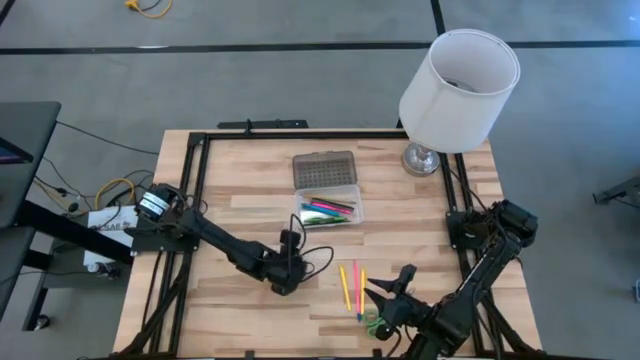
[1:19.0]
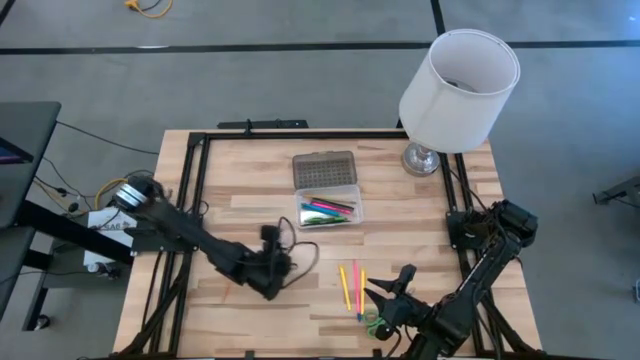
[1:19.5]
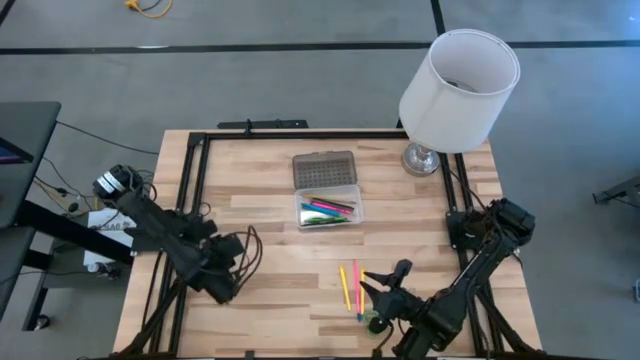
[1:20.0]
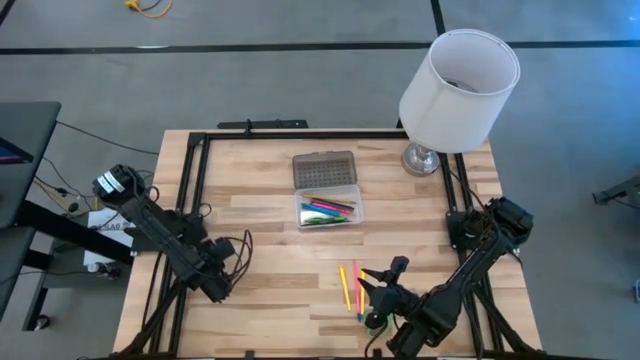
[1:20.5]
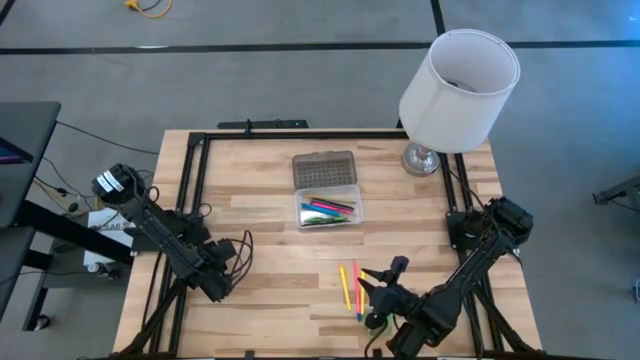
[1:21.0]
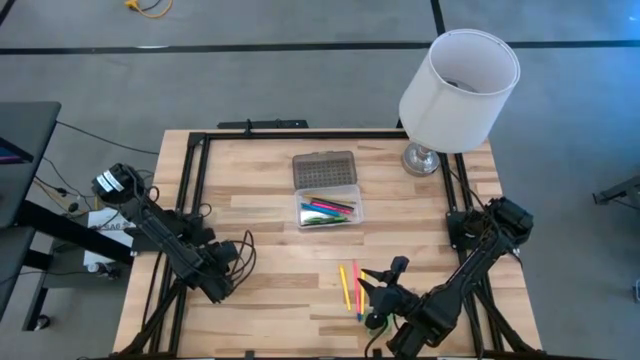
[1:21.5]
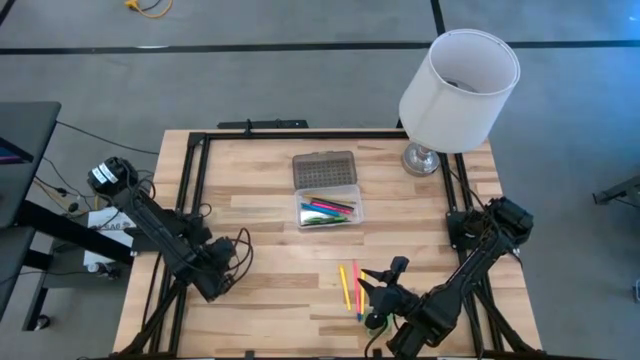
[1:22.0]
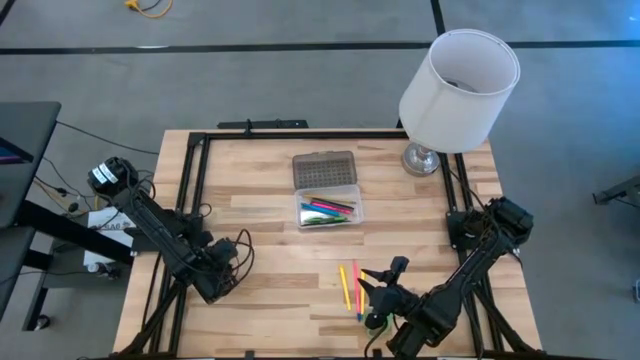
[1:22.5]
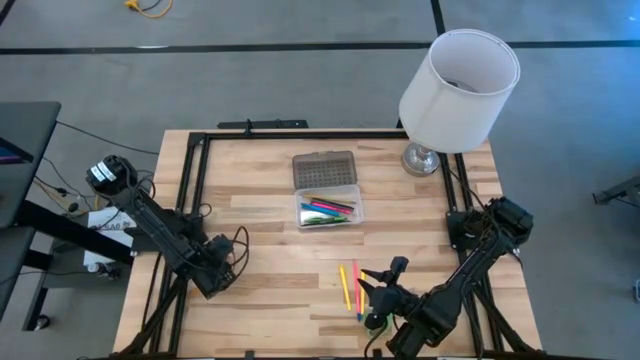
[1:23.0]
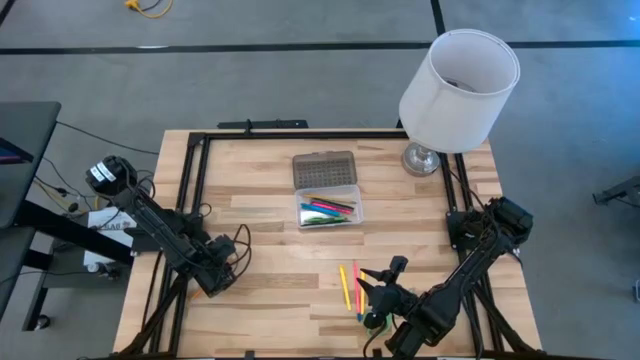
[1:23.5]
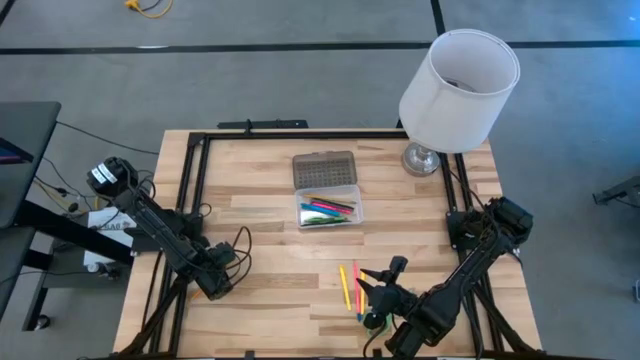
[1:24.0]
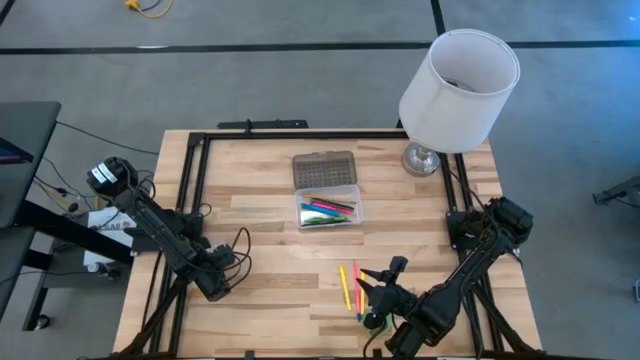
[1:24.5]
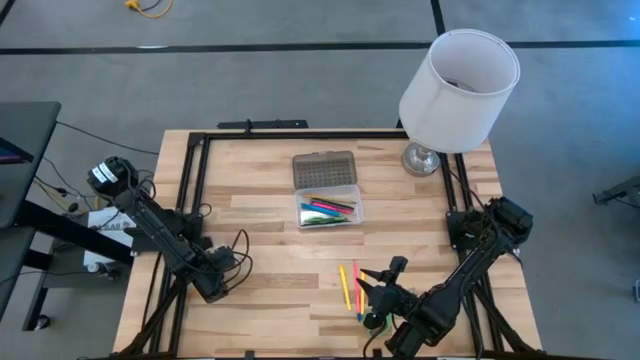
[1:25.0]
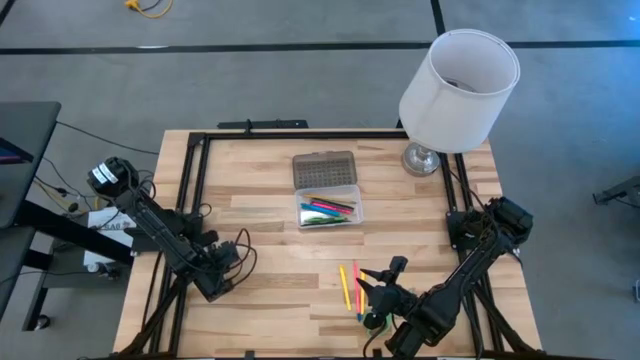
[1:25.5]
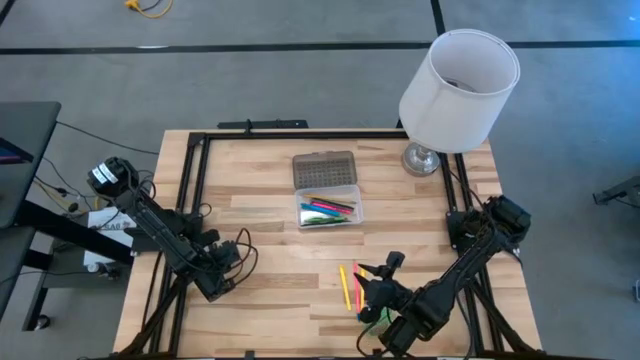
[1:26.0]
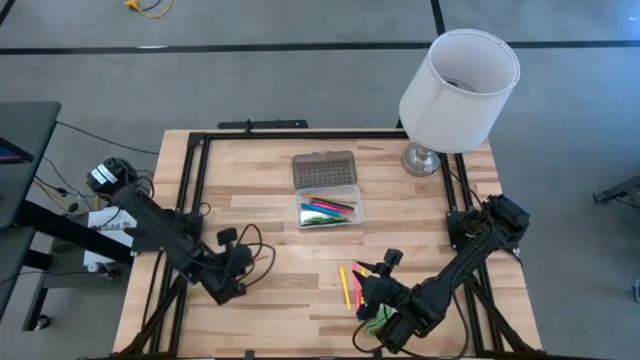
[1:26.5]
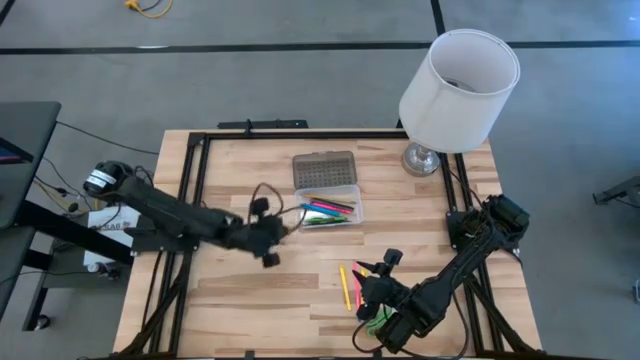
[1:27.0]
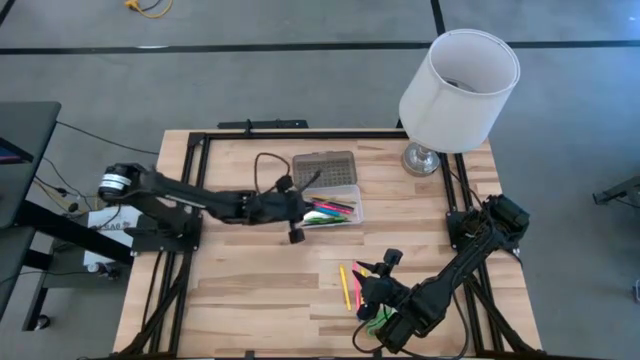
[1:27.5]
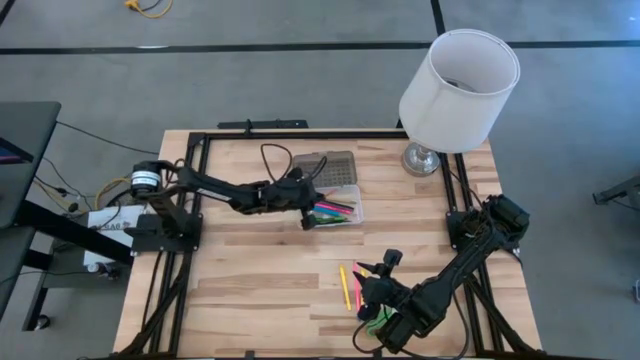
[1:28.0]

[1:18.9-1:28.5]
Task: Pick & place school supplies into a supply box
Put the pencil into the gray supply box

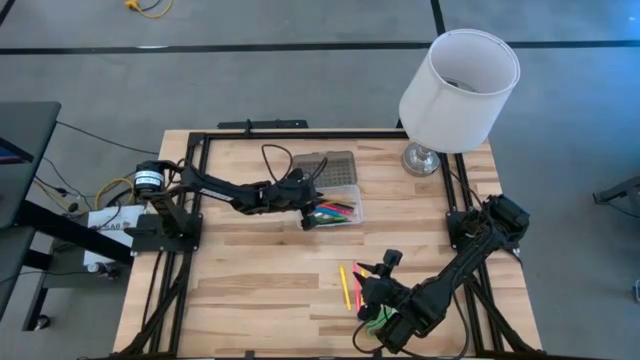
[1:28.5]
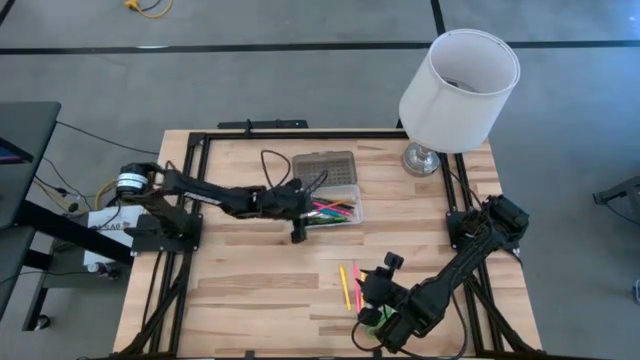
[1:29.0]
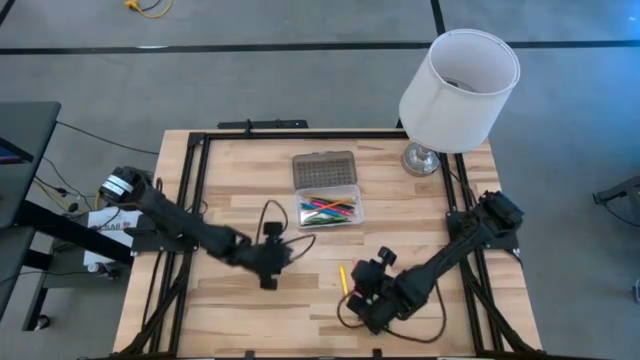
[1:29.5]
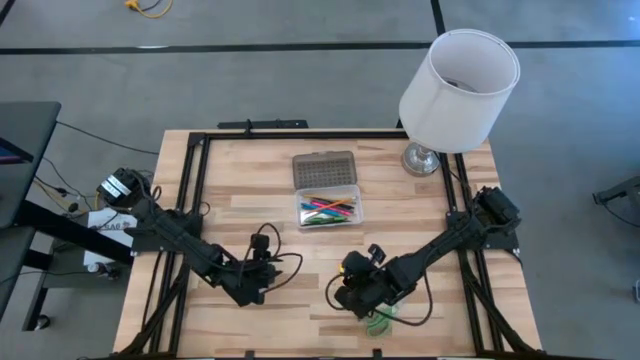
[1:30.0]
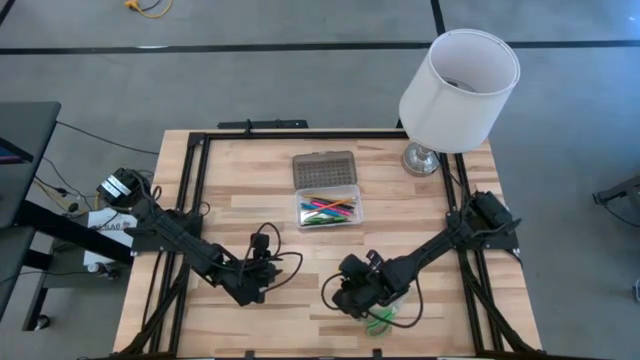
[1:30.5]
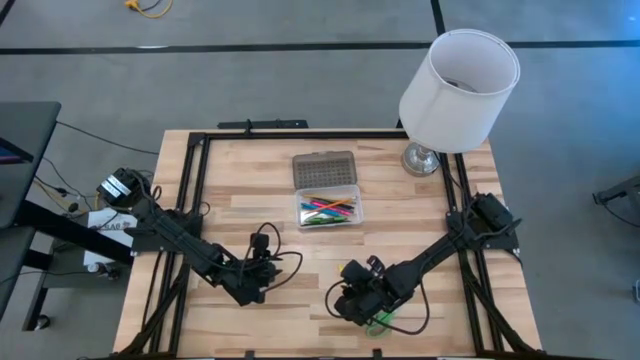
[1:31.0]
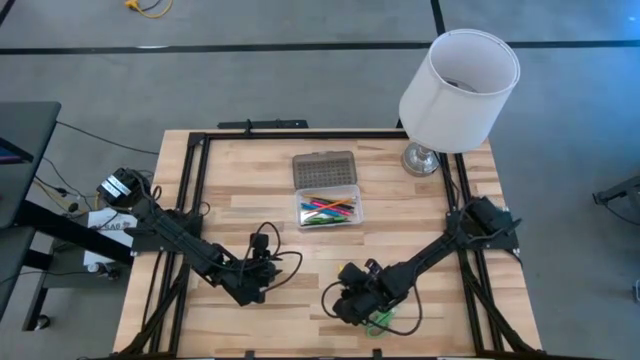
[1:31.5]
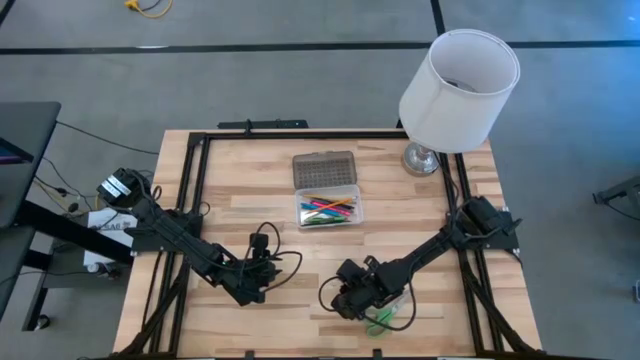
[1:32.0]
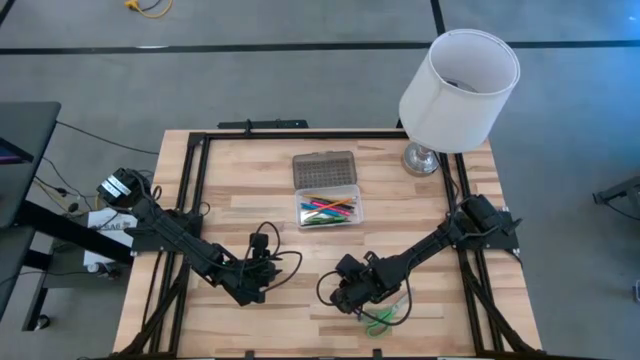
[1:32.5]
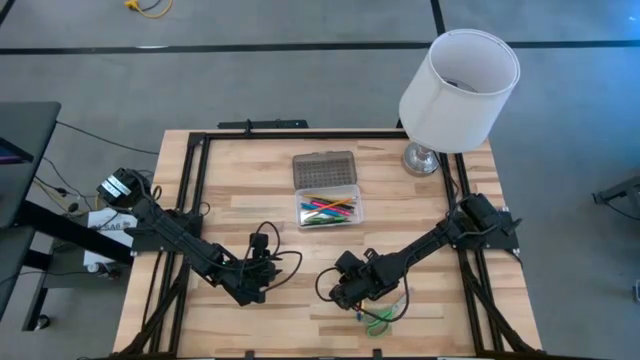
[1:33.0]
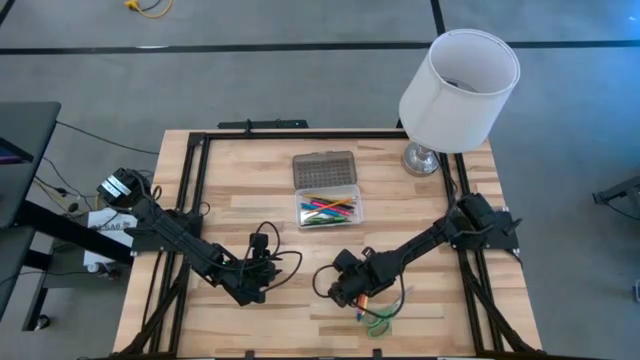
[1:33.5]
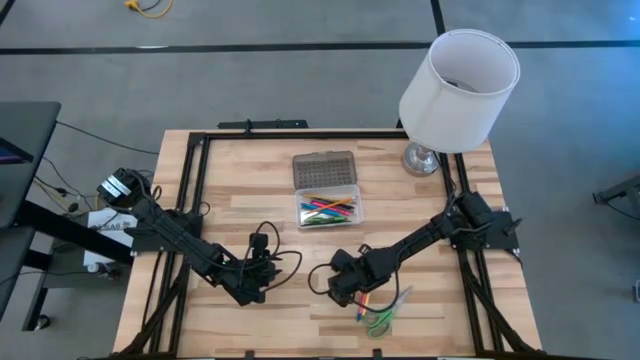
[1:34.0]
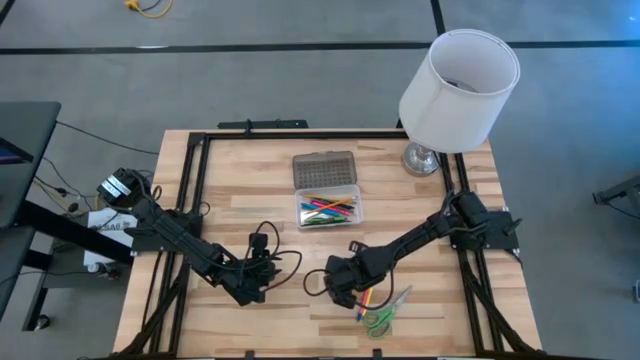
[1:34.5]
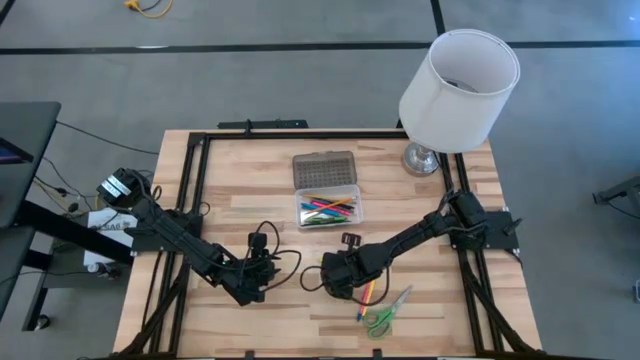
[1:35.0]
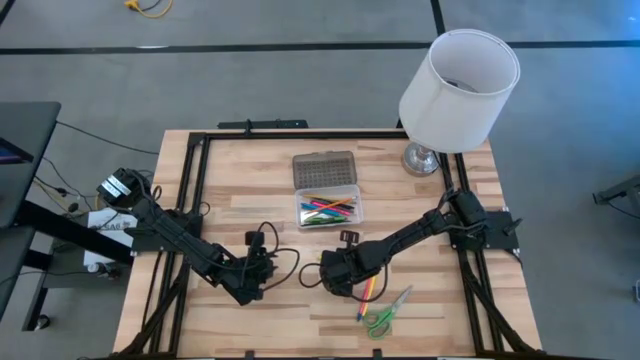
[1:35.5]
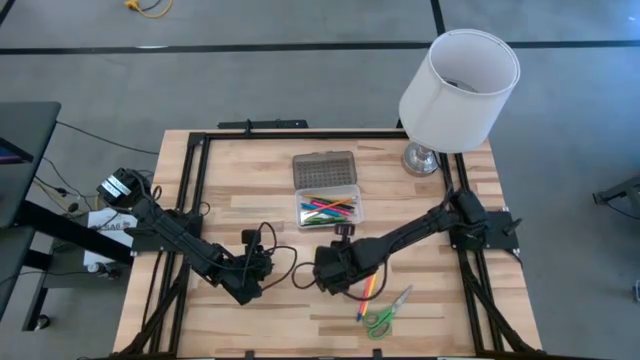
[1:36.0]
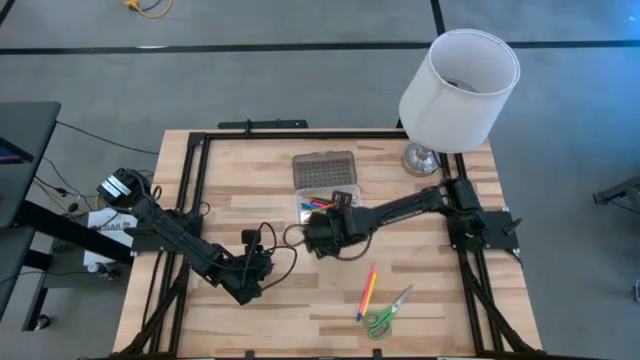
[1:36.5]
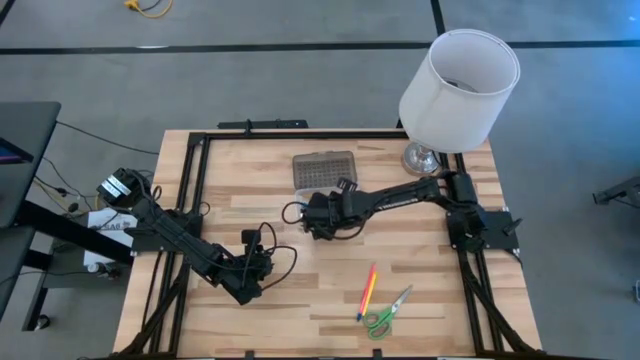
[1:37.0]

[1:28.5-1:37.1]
Put the left yellow pen into the gray supply box

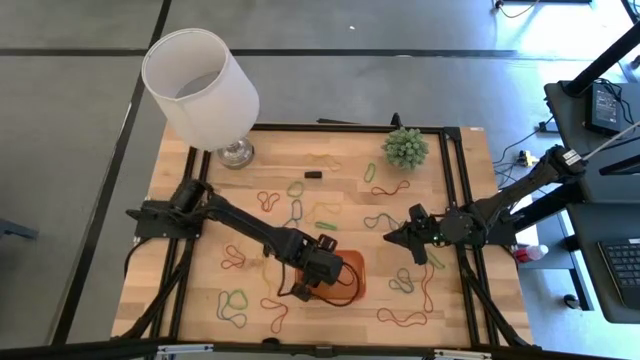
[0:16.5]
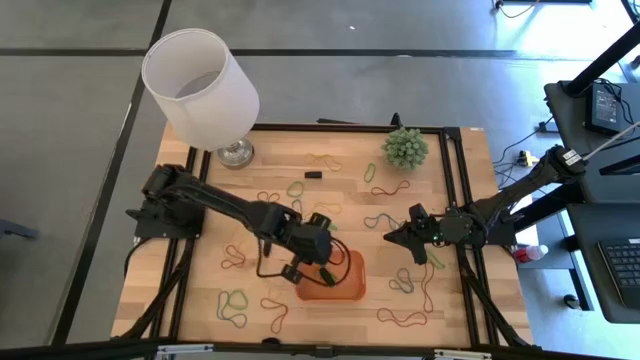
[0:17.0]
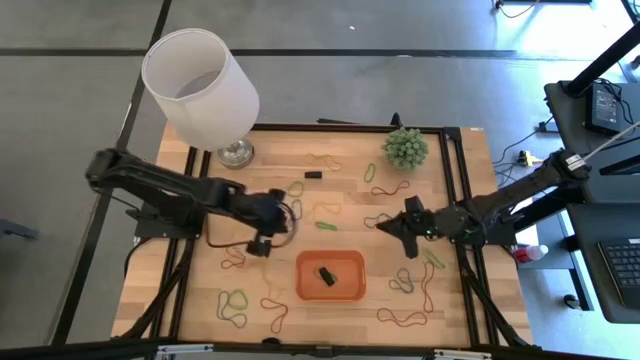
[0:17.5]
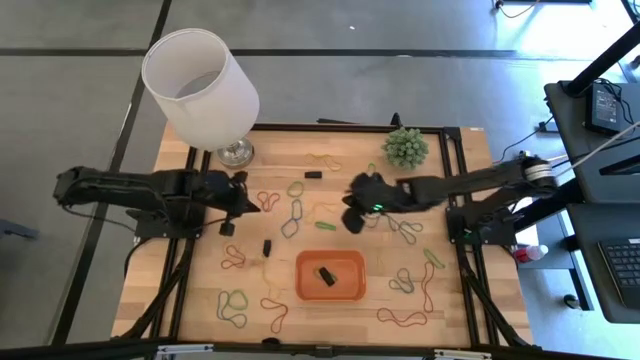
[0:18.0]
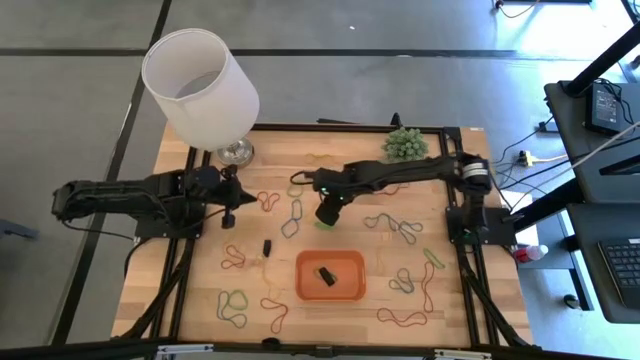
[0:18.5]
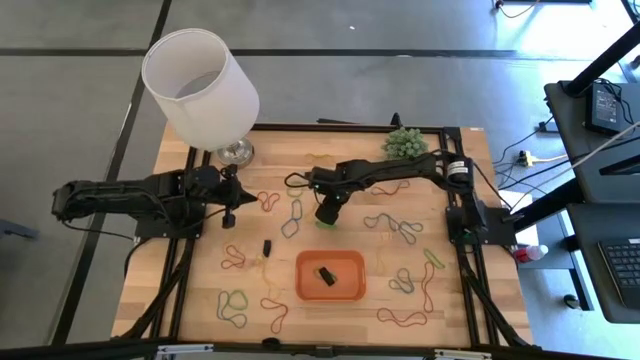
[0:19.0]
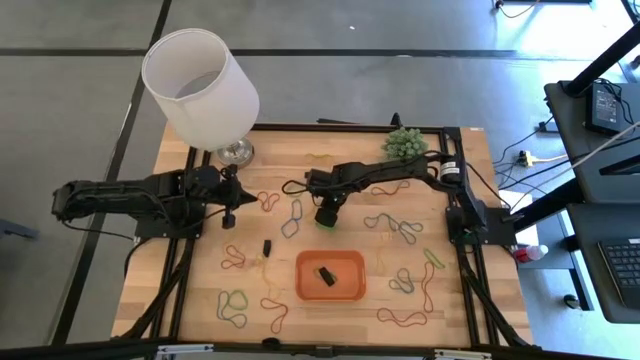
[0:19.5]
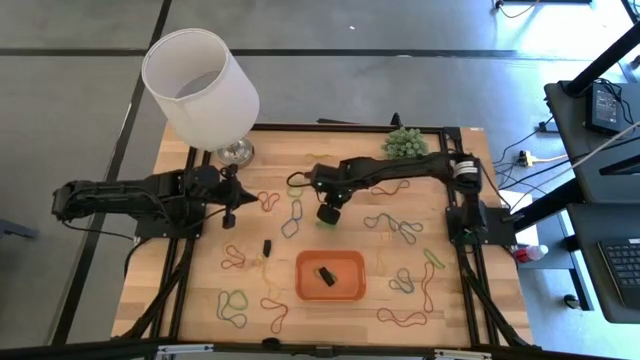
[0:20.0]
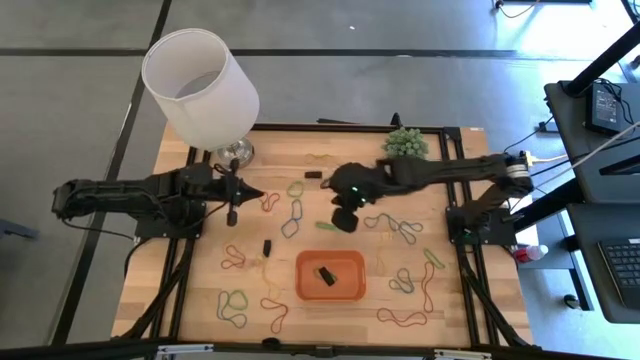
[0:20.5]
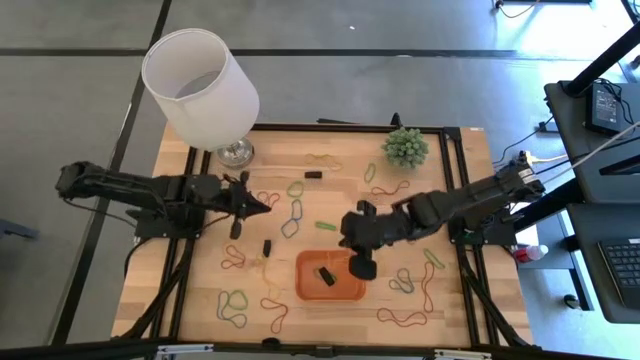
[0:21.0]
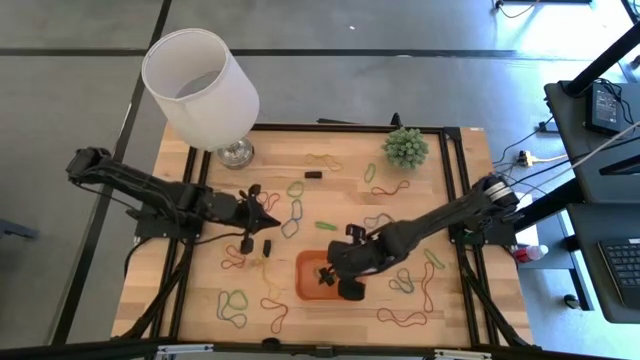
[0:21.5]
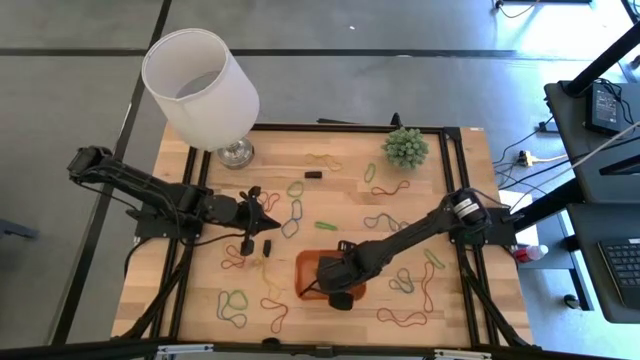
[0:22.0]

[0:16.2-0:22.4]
Task: Pick and place rubber bands into bin
Put the yellow rubber band into the orange bin
